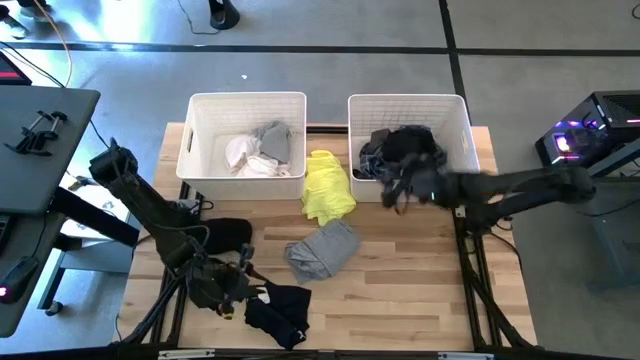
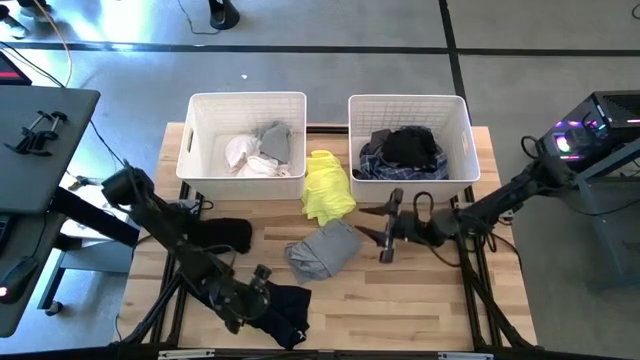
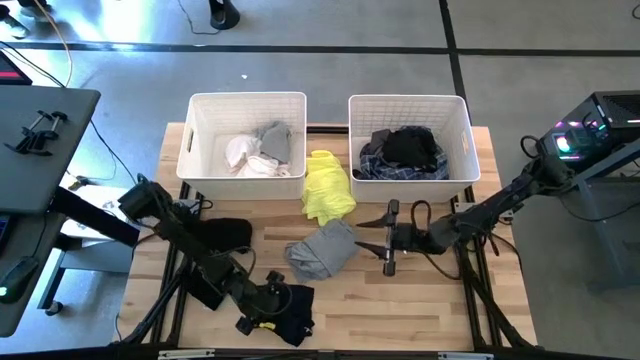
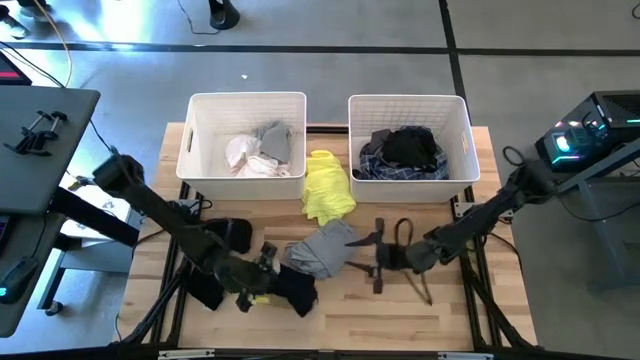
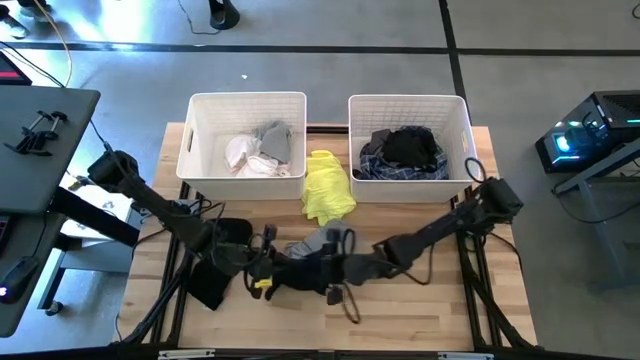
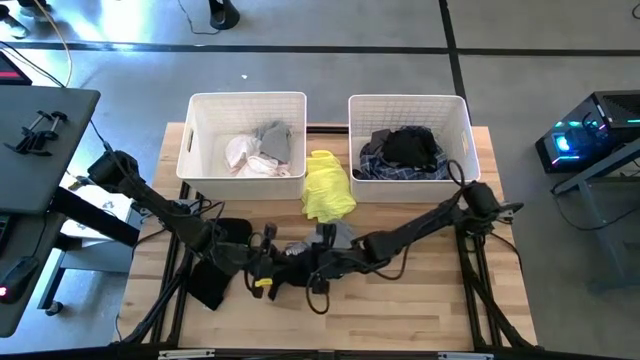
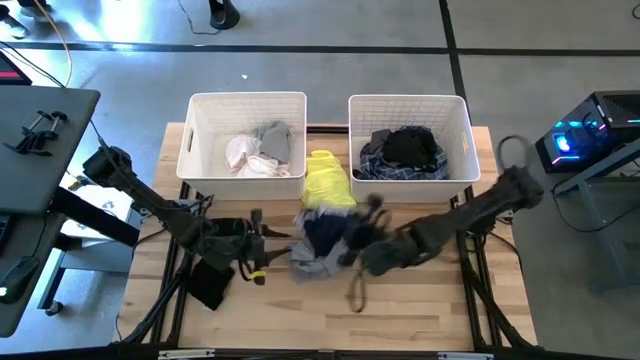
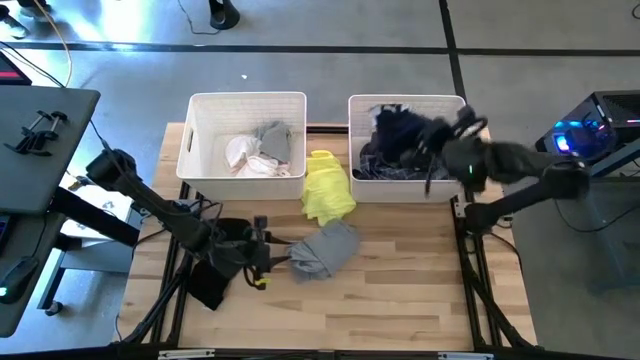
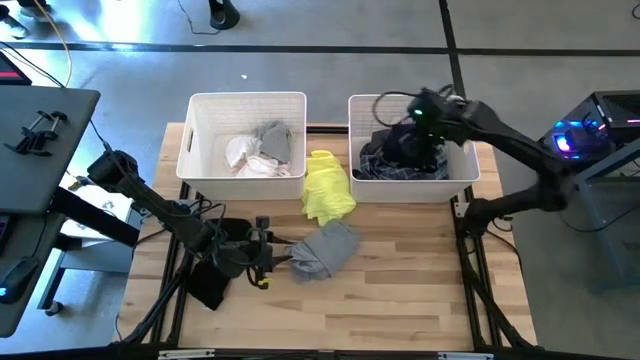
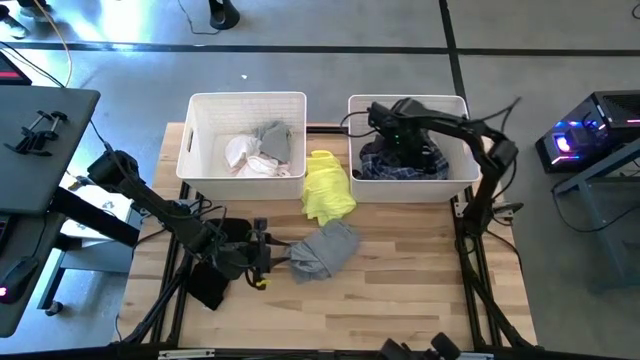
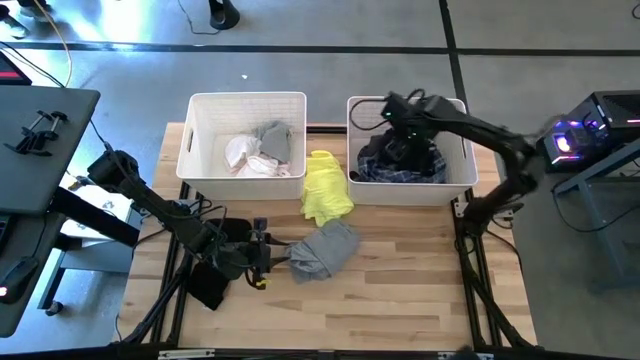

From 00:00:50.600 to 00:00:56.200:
Task: Sort clothes
Put the black boxers into the right white laundry bin

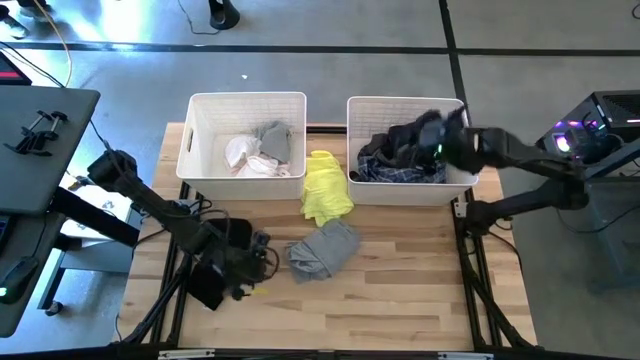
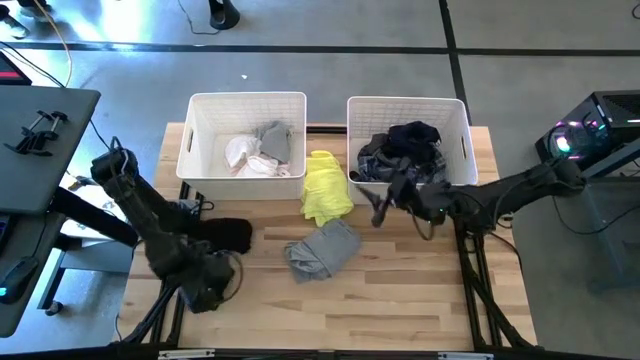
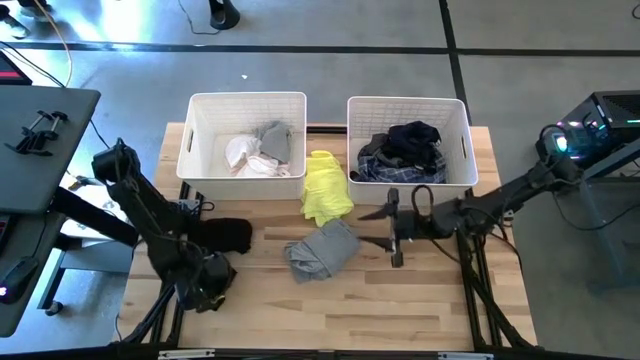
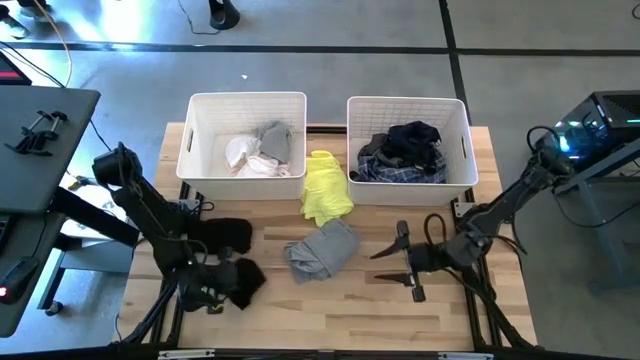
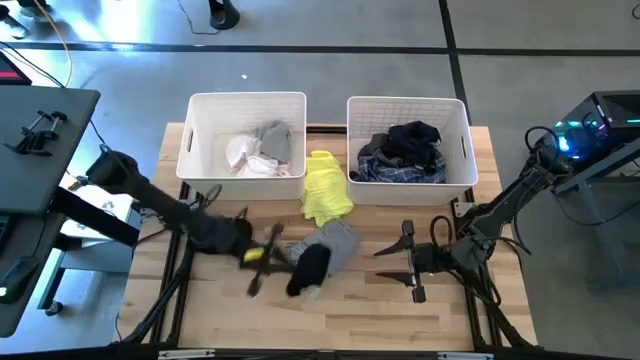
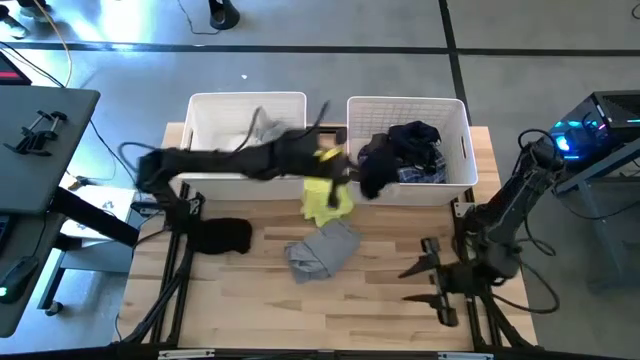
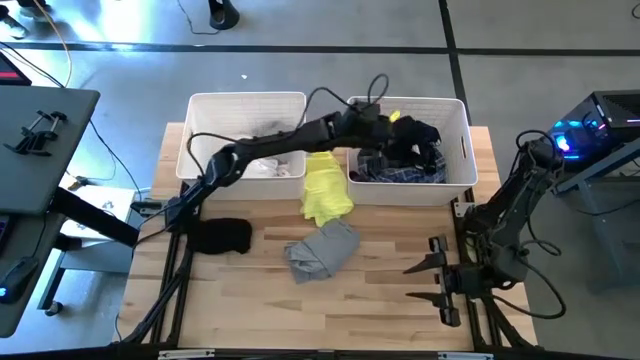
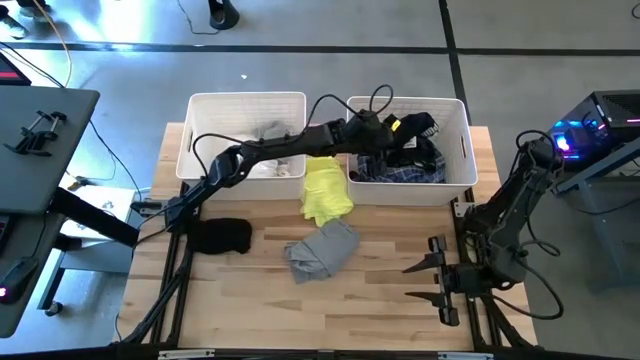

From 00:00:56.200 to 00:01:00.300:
Put the black boxers into the right white laundry bin

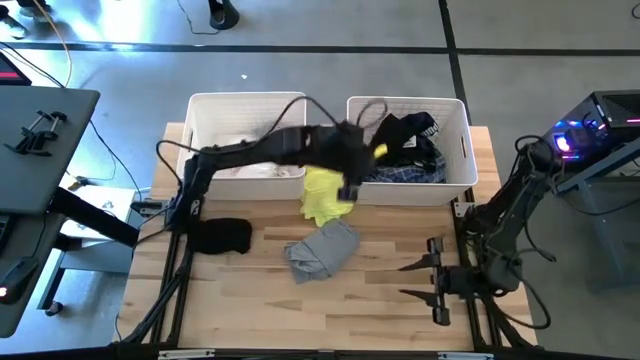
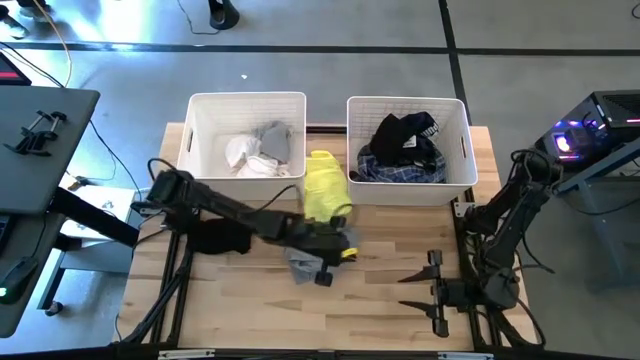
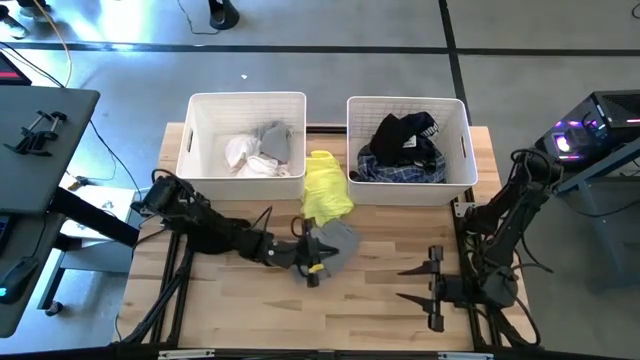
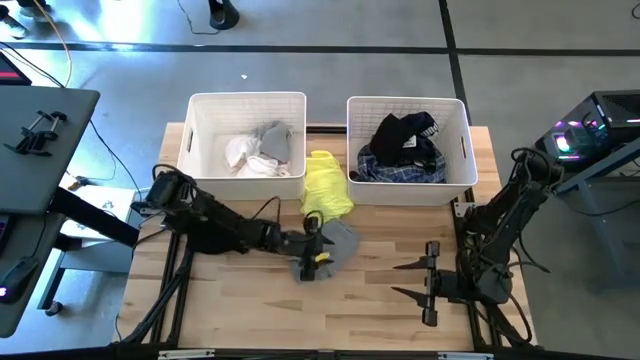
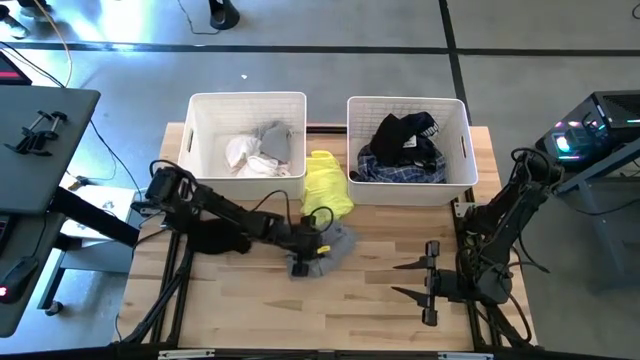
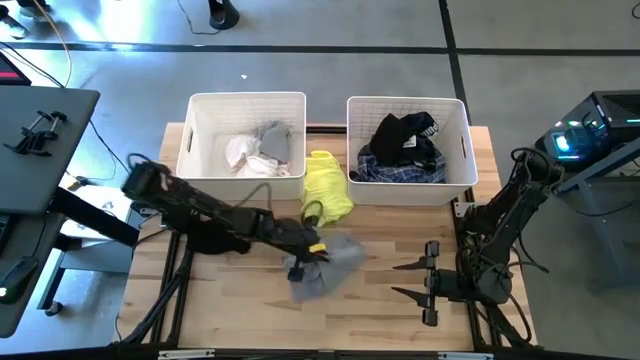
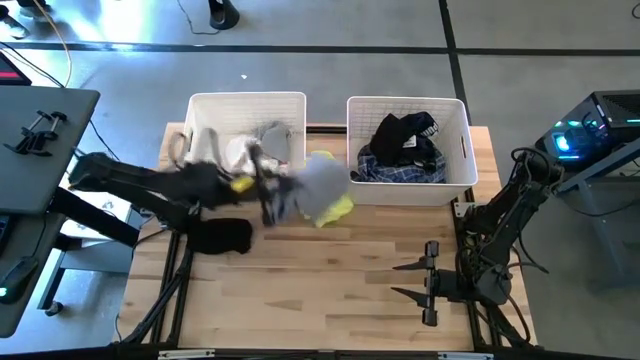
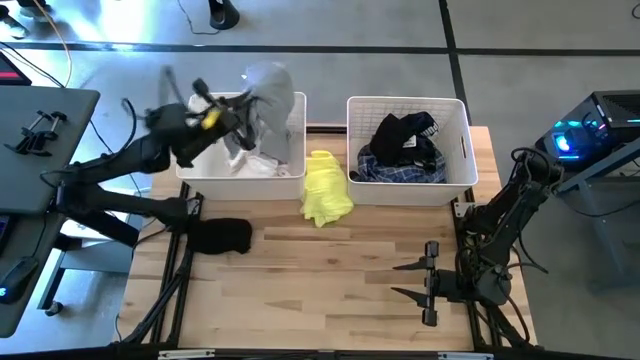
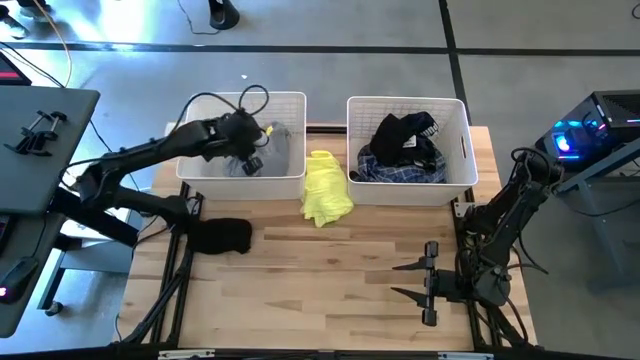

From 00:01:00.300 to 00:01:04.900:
Put the gray shirt into the left white laundry bin

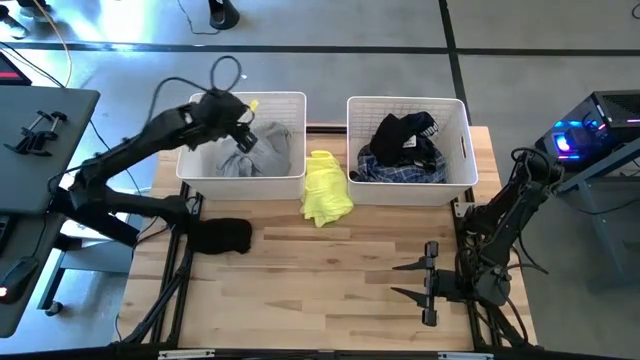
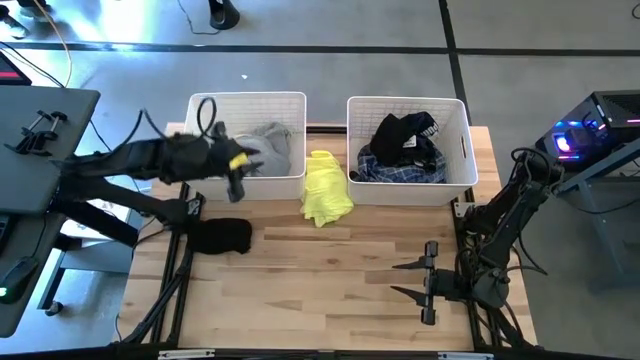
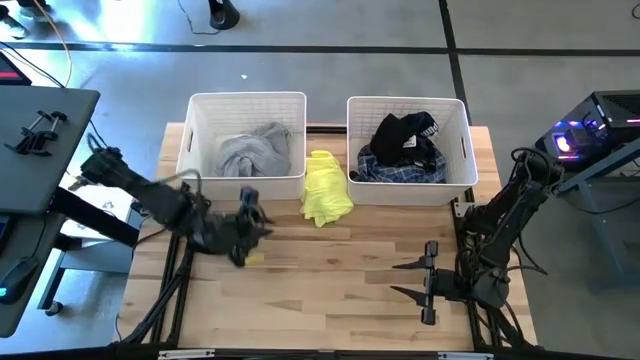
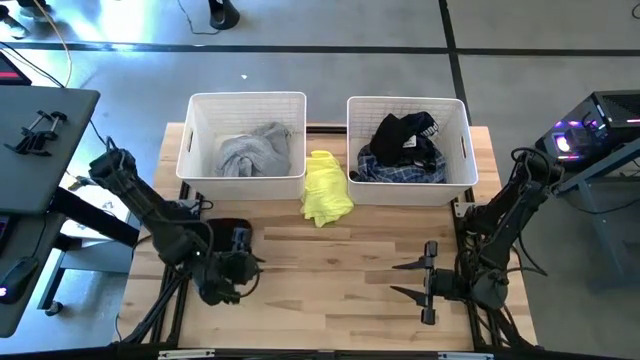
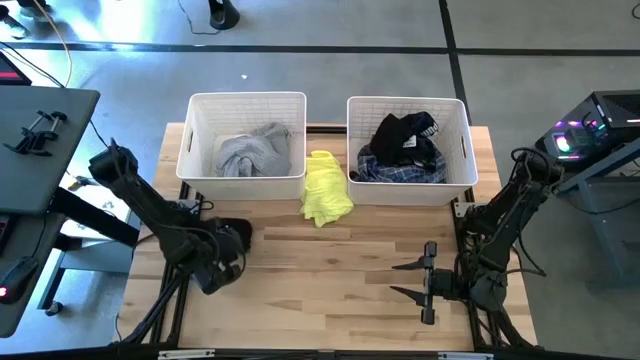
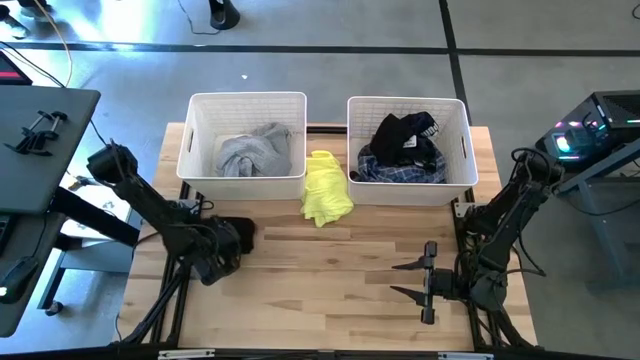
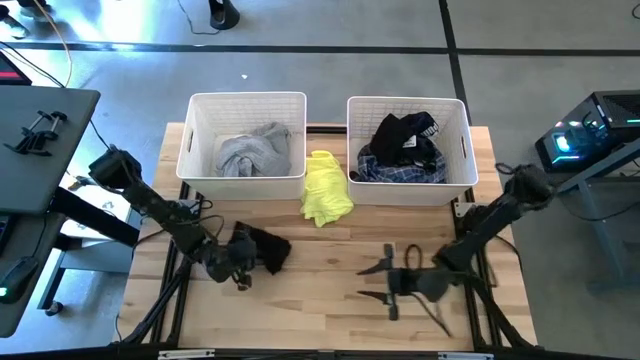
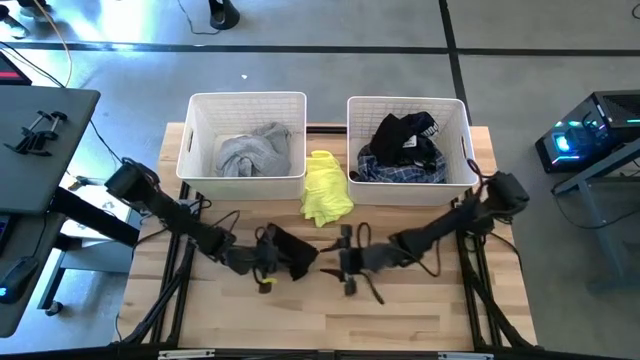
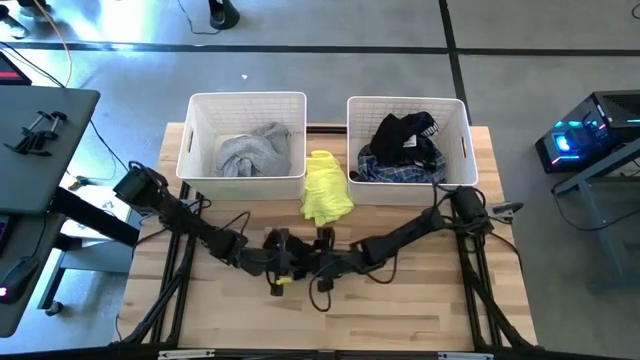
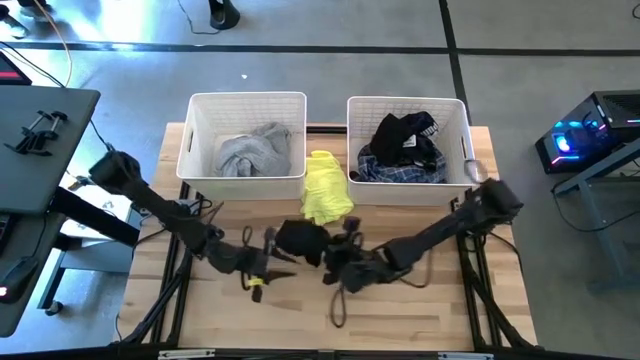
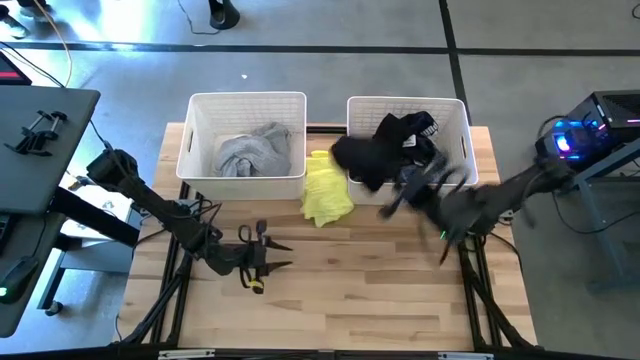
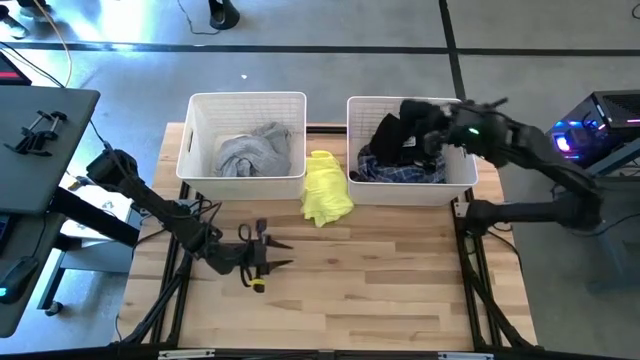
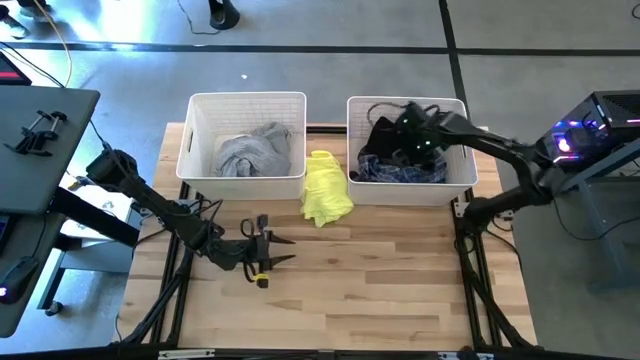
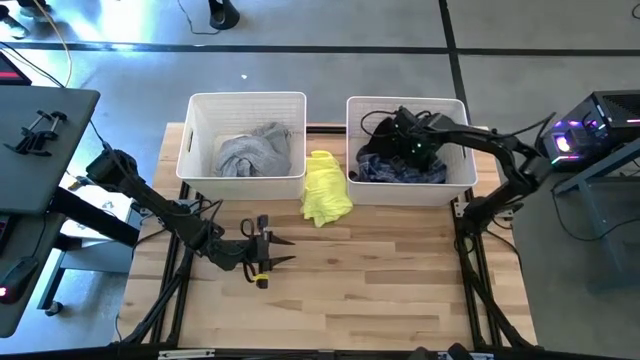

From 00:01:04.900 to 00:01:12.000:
Put the black shorts into the right white laundry bin
